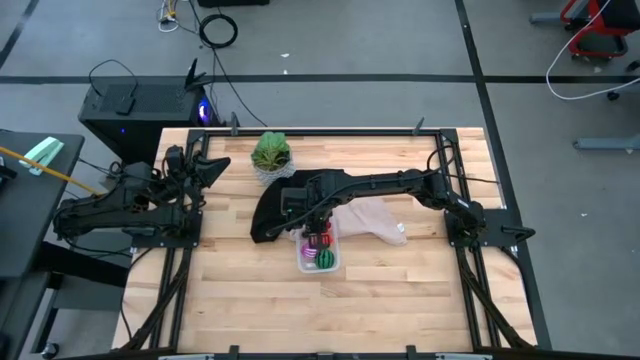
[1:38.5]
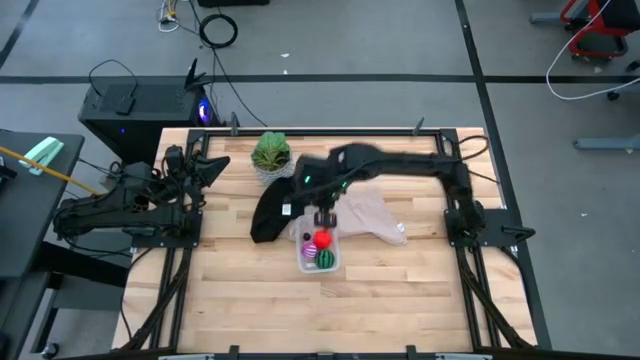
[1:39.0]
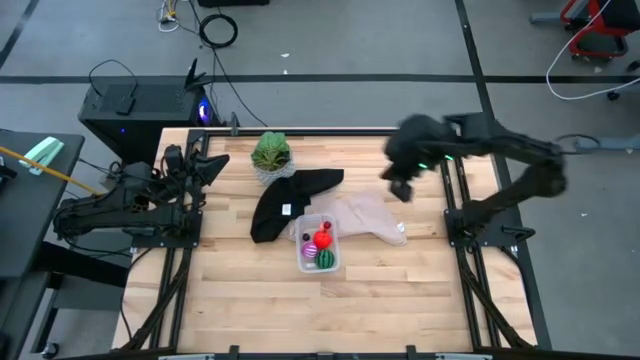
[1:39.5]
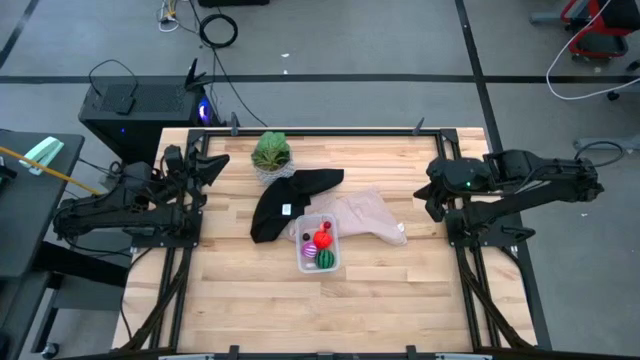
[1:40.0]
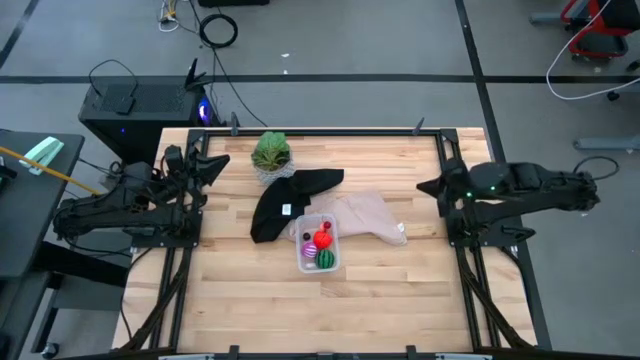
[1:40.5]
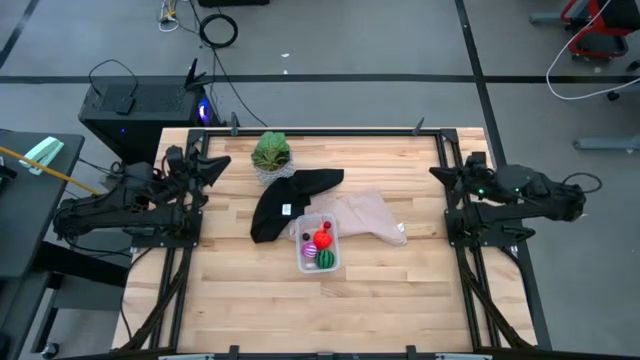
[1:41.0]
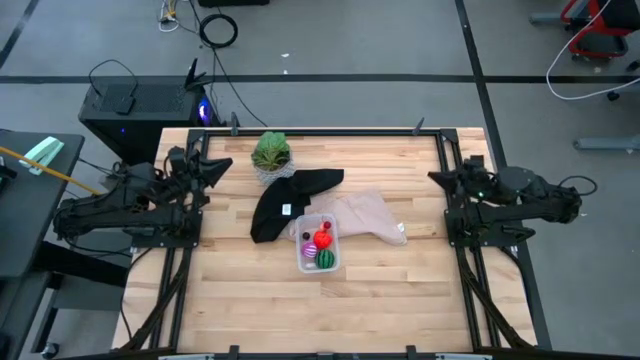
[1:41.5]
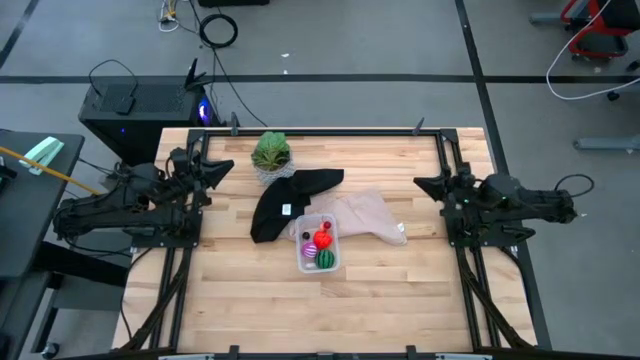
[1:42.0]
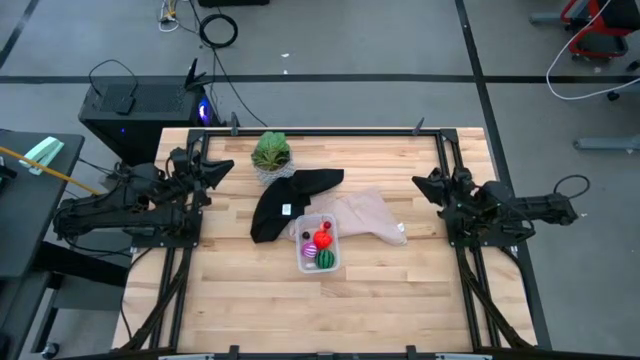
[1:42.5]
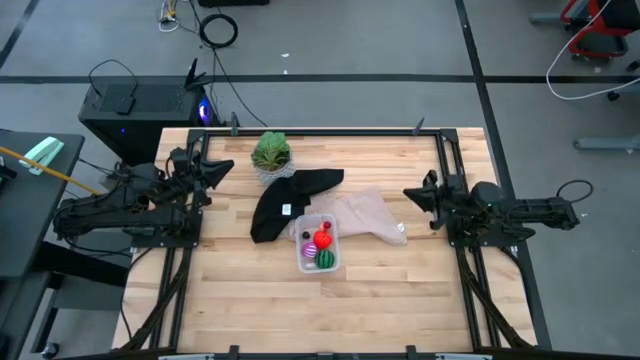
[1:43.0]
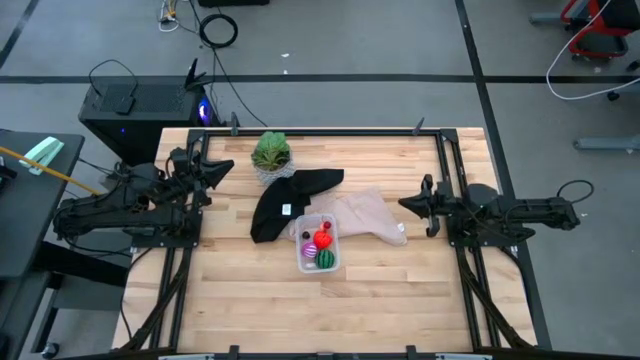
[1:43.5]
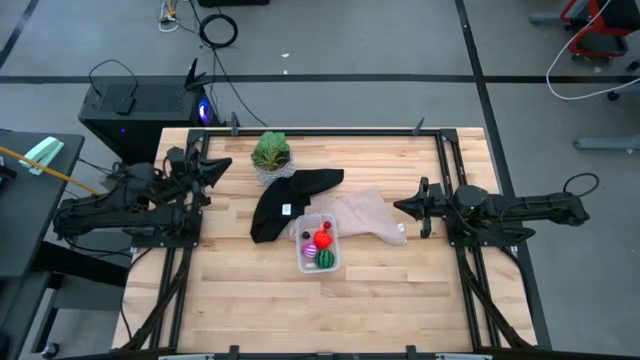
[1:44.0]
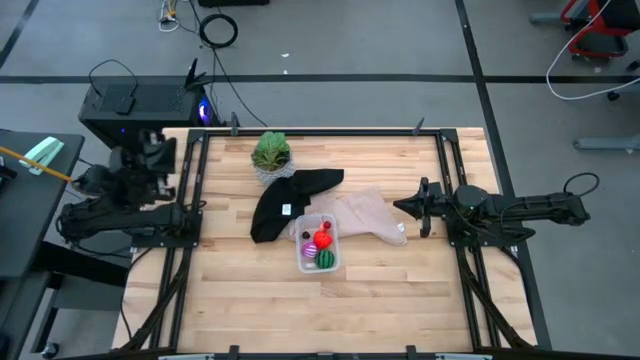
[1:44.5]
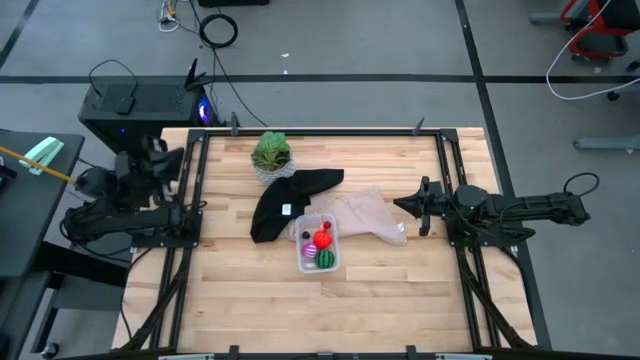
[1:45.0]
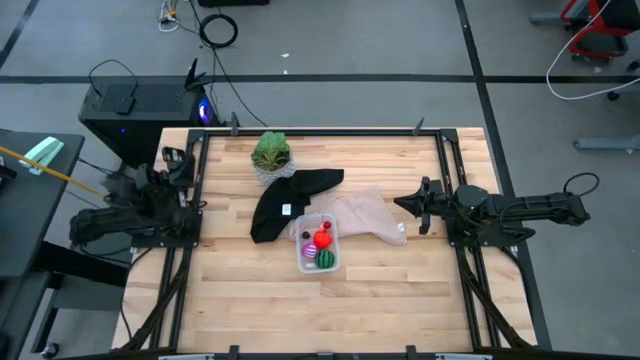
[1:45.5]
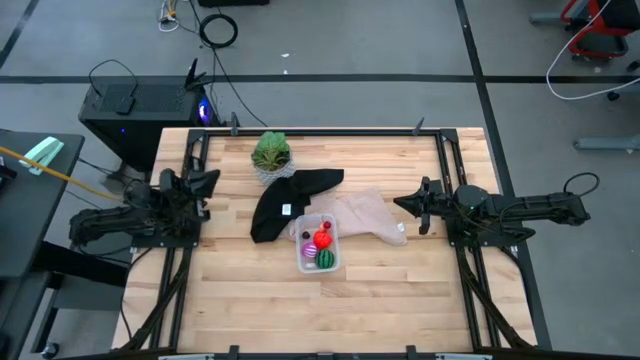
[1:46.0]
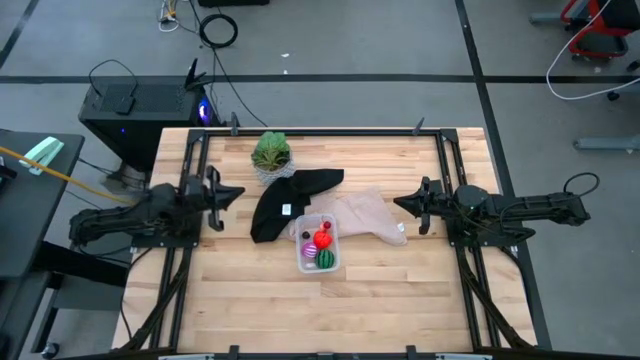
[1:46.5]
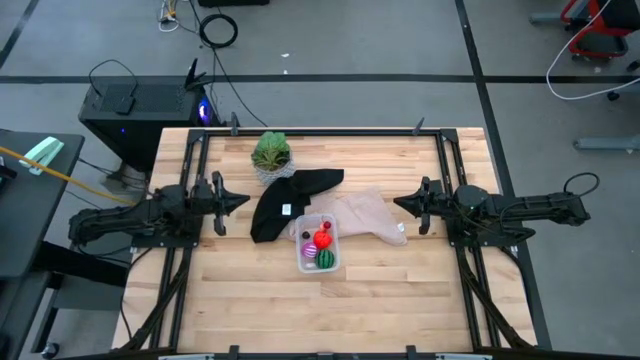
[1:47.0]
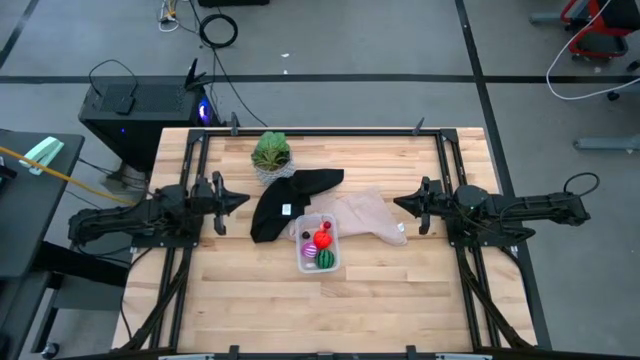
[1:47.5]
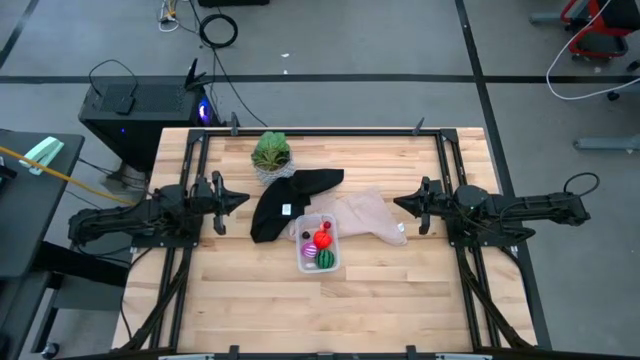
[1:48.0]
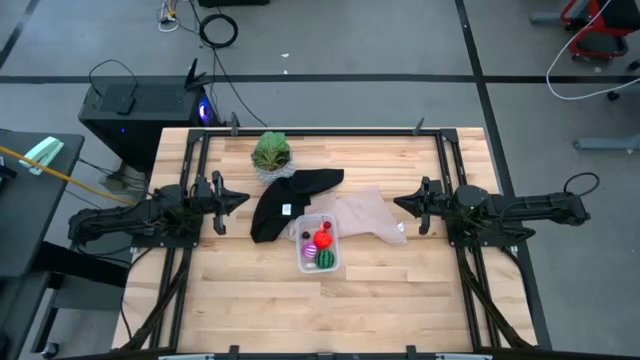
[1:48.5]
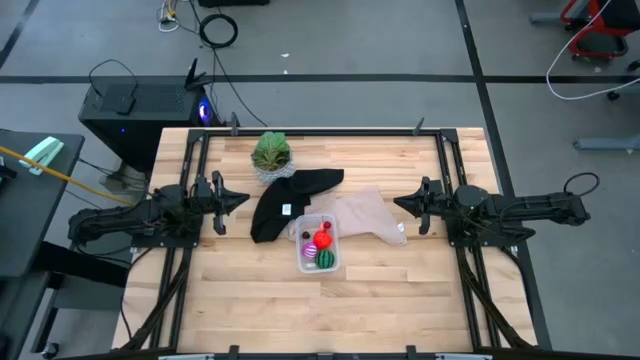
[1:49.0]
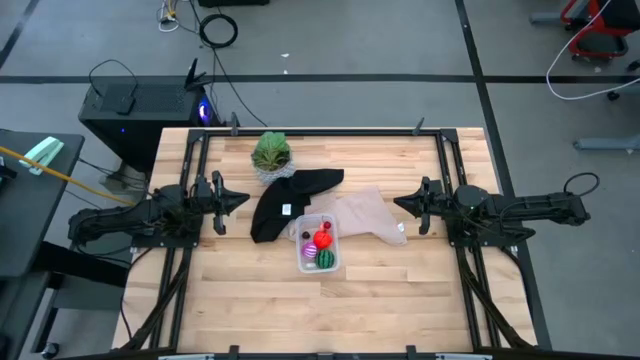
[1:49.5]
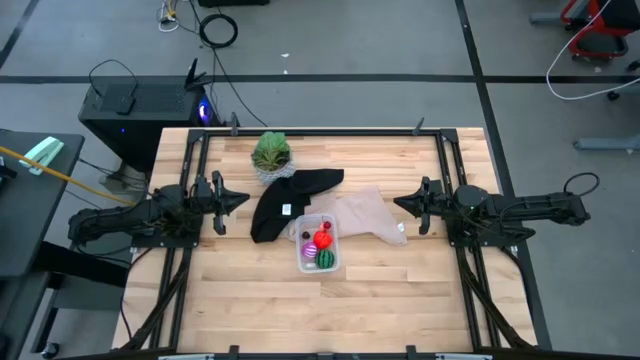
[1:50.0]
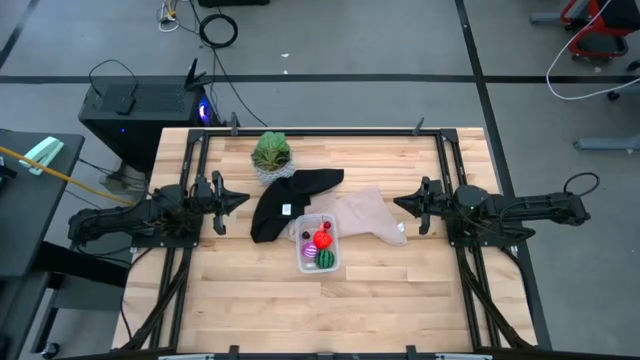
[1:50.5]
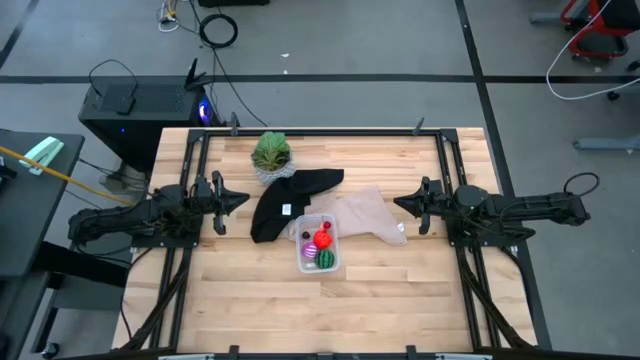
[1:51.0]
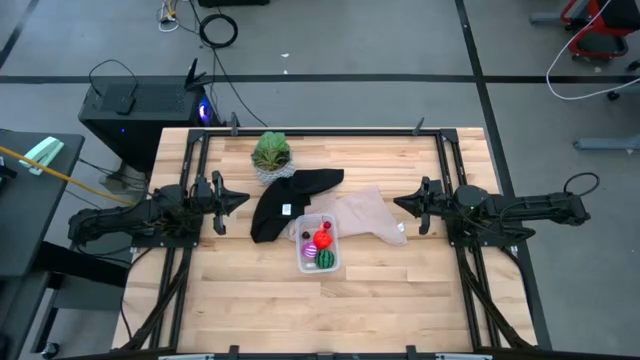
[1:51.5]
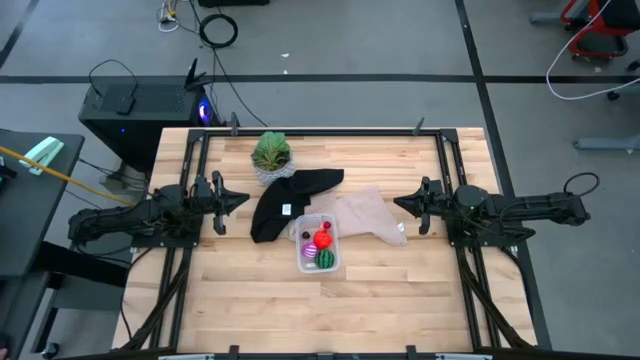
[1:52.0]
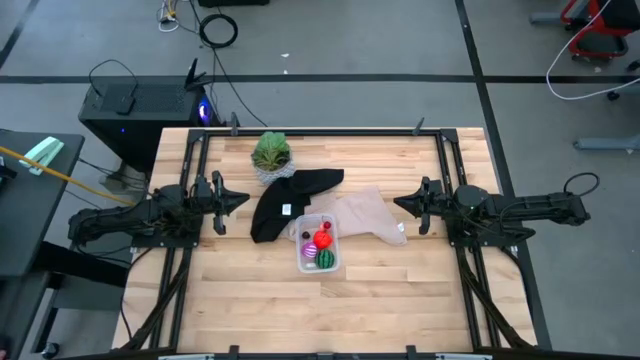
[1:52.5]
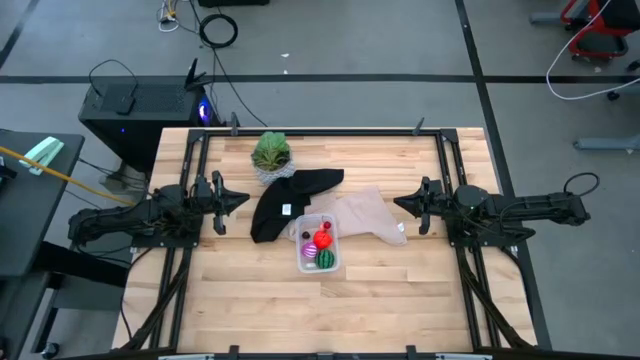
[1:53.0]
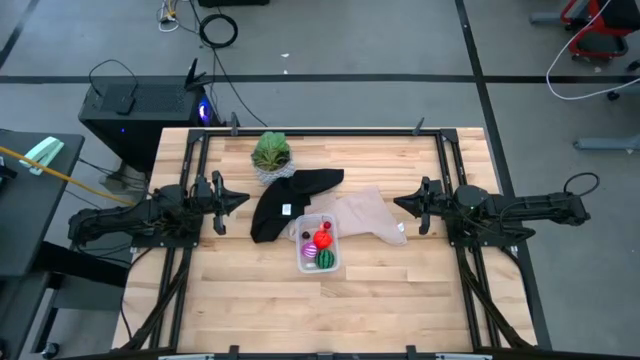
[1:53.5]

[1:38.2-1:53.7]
Task: Pick and placing Produce into tupperware
Return To Home Position

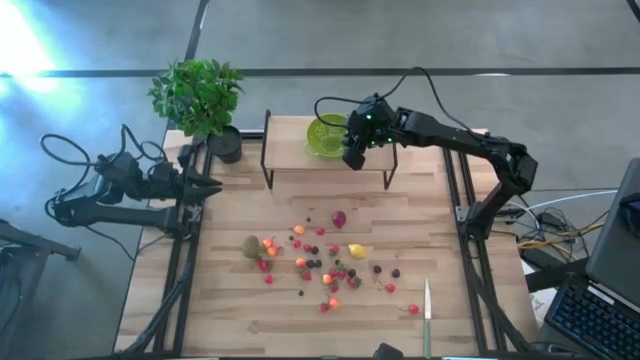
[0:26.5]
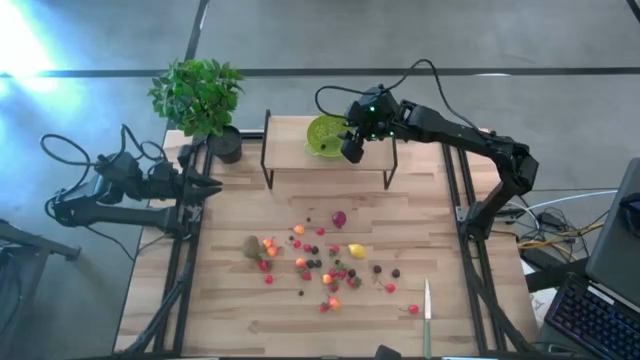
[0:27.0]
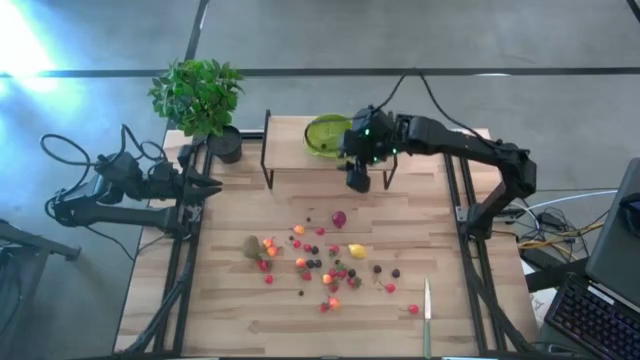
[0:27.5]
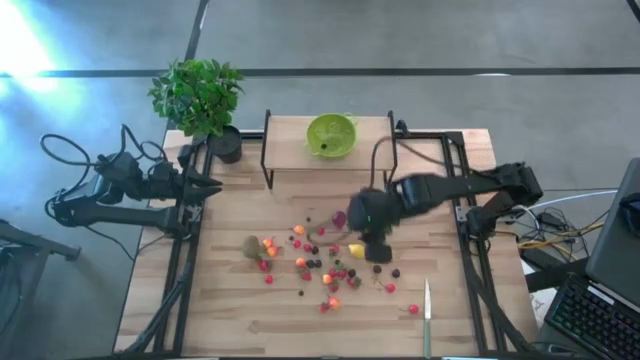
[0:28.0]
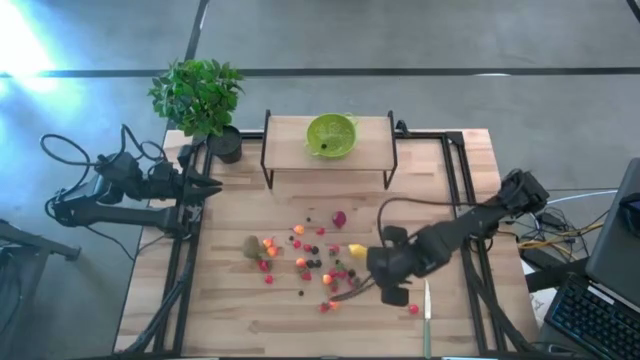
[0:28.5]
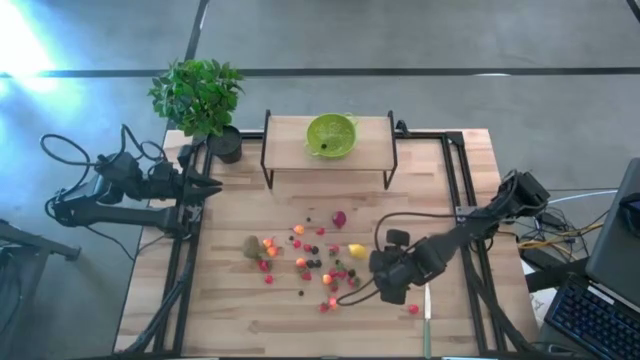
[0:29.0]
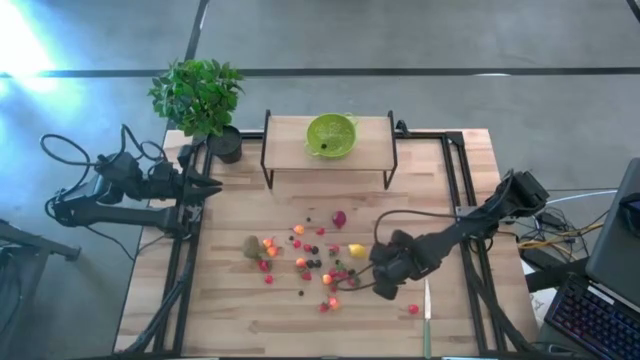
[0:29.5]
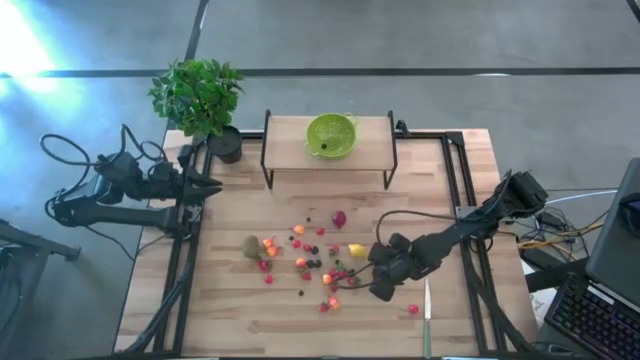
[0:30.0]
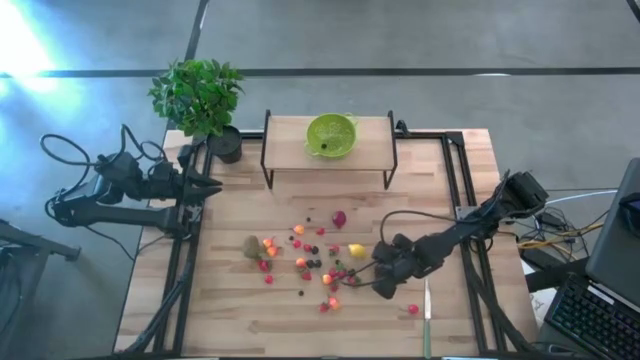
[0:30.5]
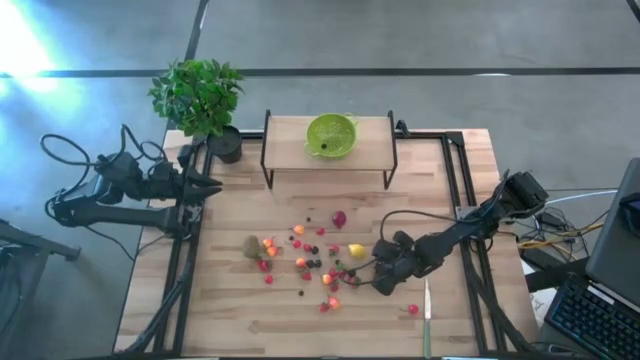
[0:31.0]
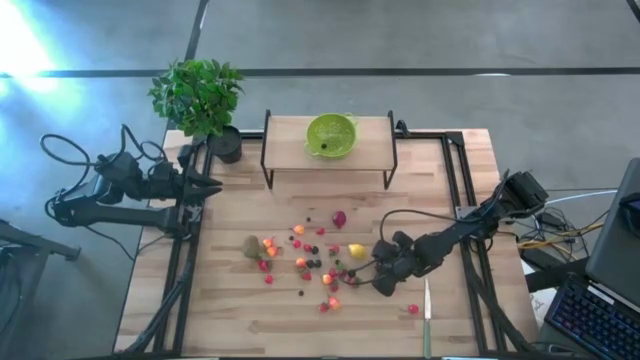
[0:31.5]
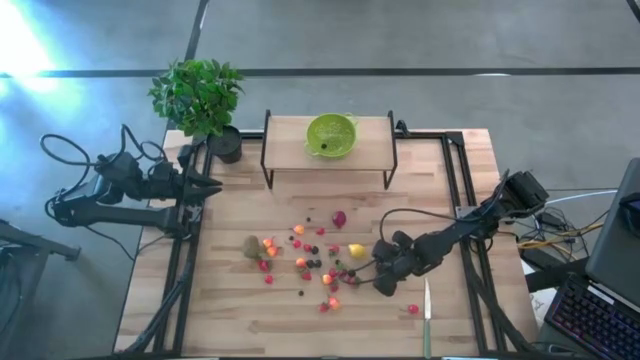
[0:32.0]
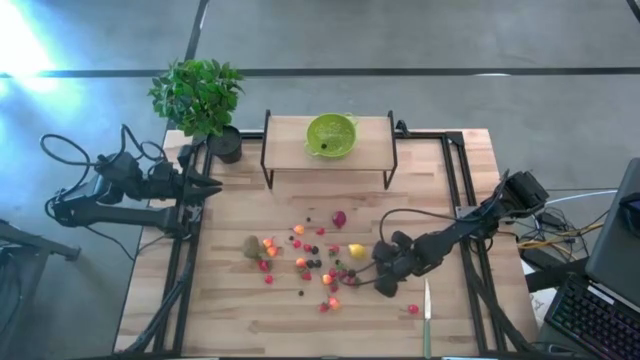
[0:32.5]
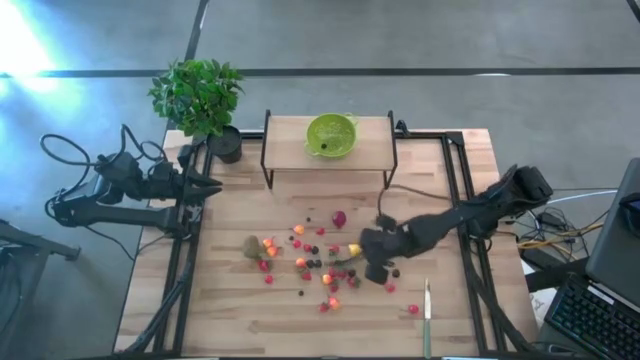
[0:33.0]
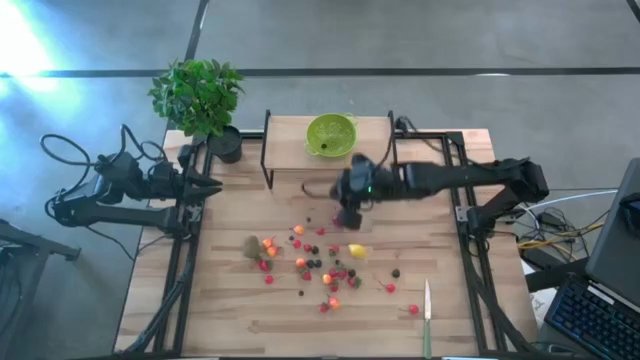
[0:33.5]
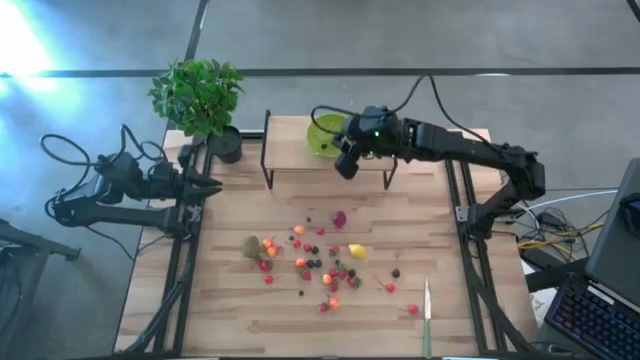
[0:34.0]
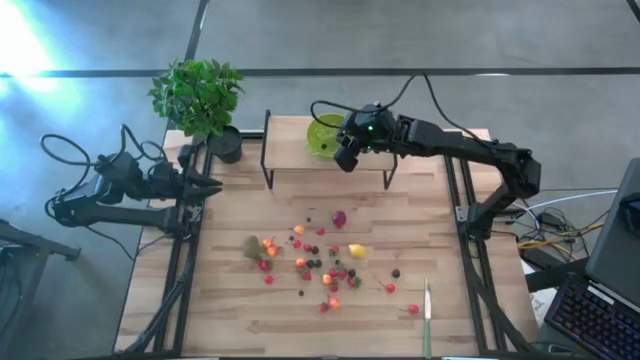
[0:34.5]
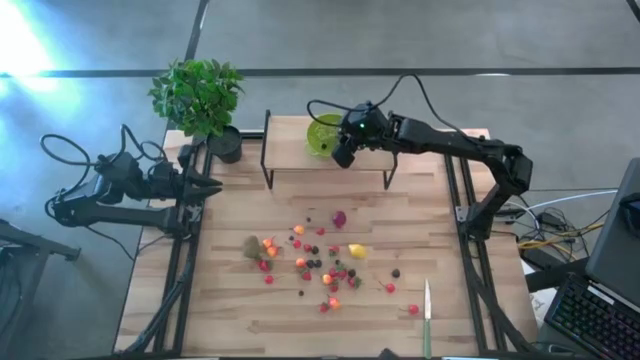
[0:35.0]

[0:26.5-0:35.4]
Task: Pick & Place Fruit
Put the black cherry into the green strainer bowl on the shelf
